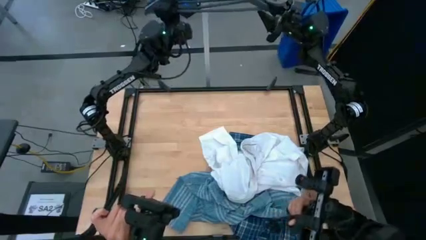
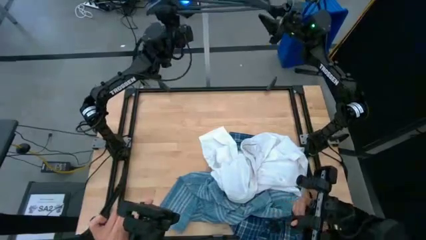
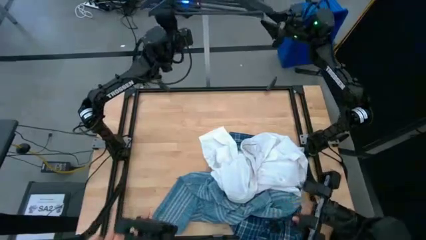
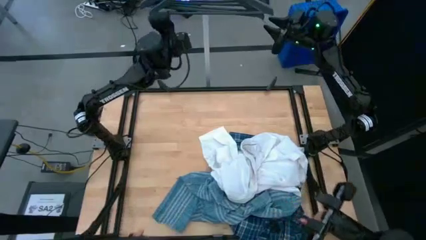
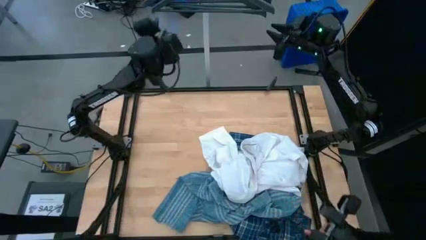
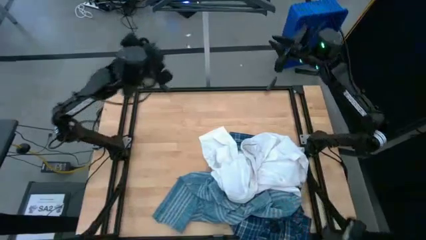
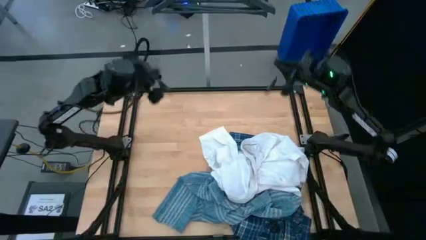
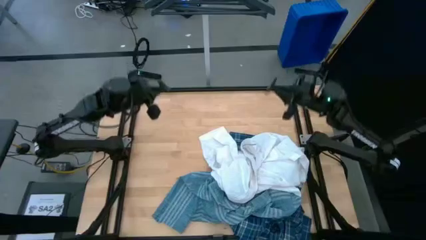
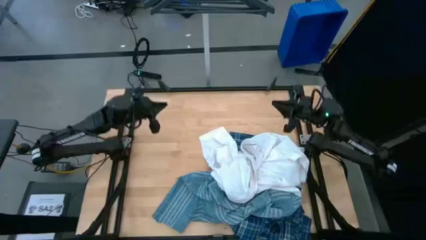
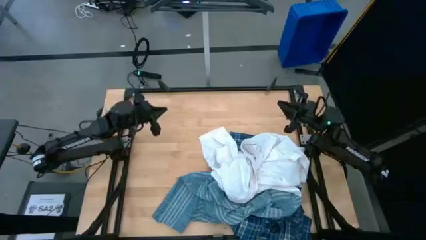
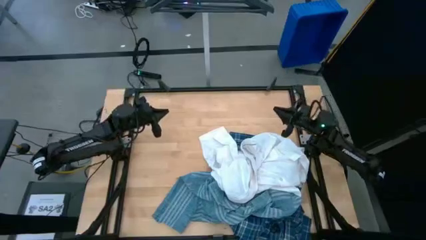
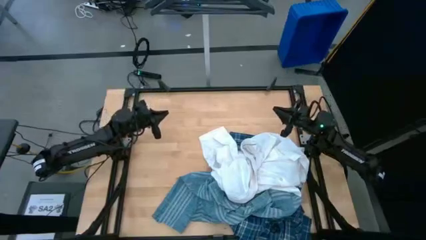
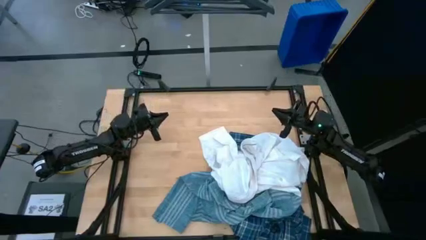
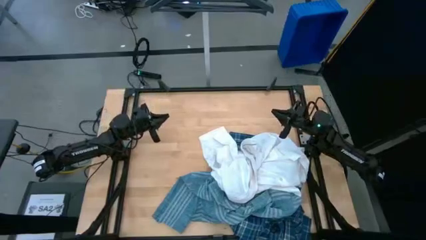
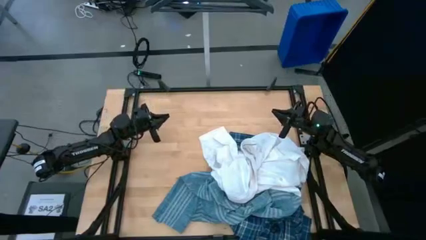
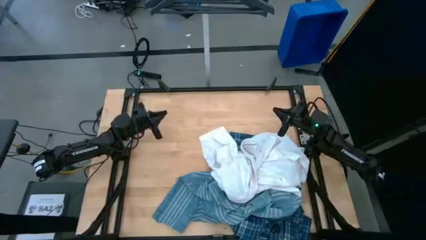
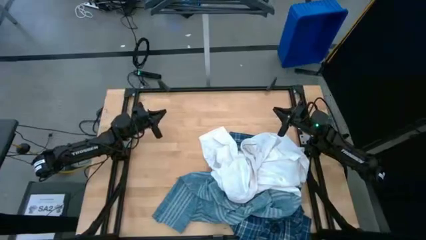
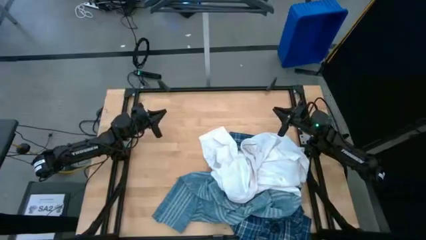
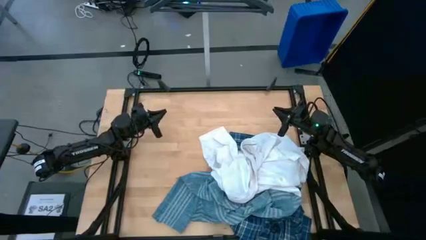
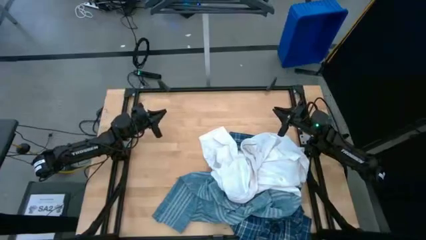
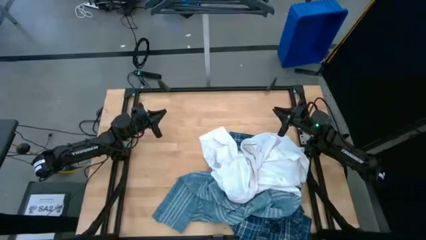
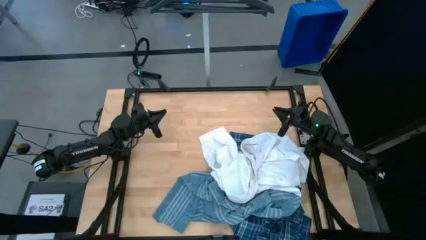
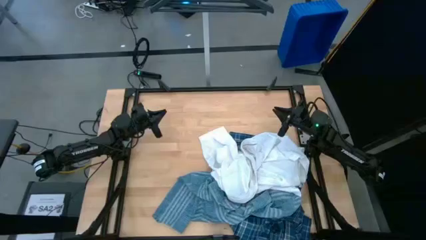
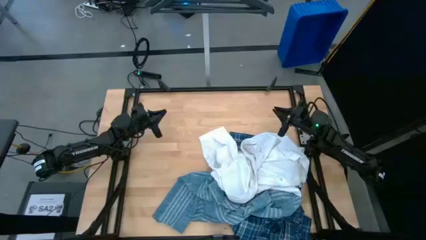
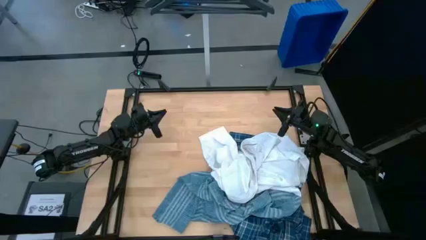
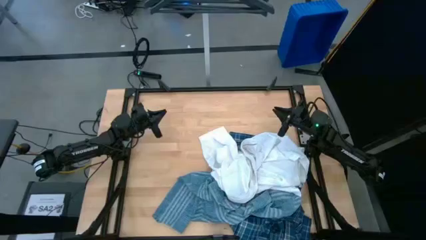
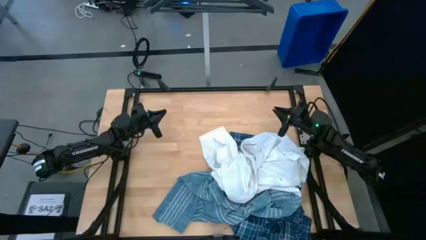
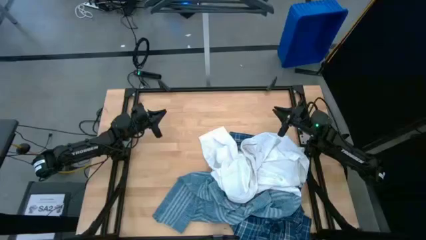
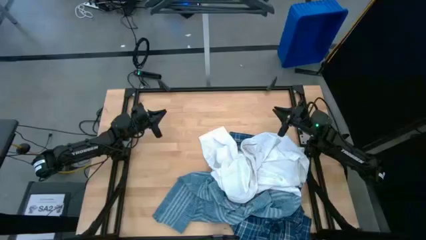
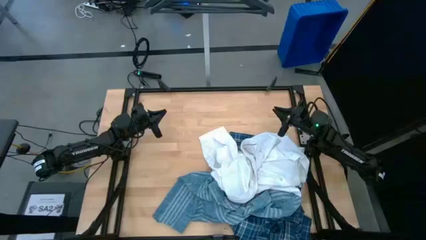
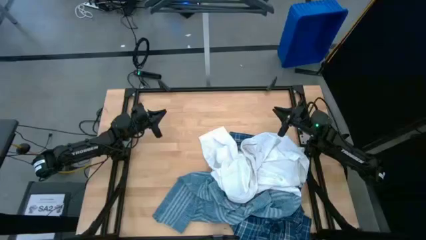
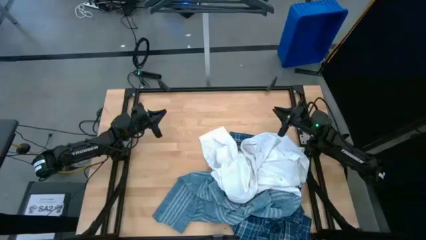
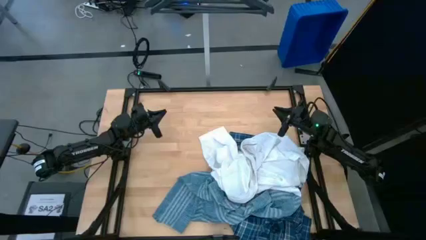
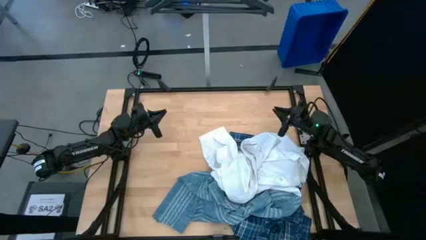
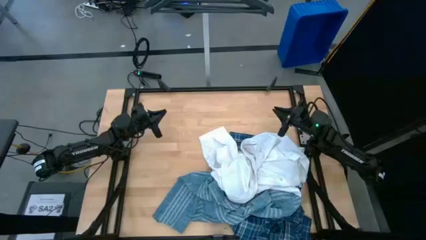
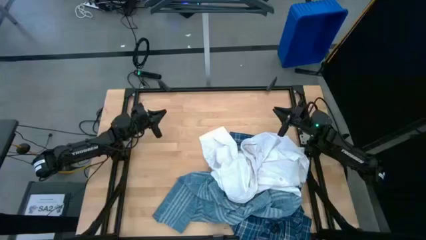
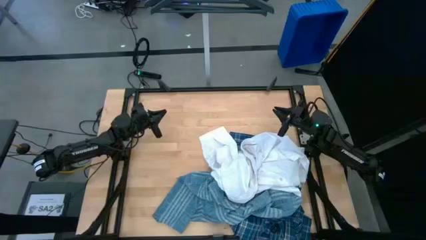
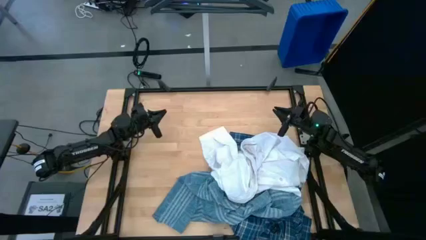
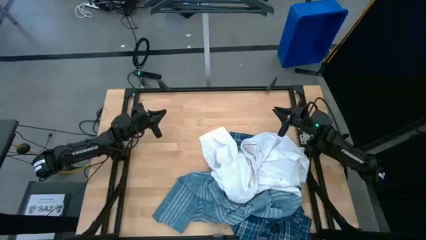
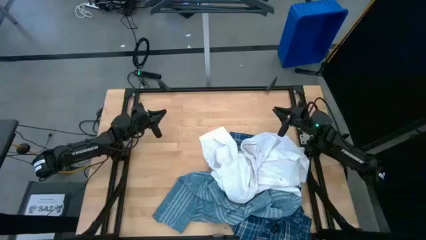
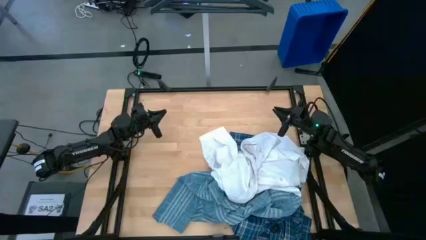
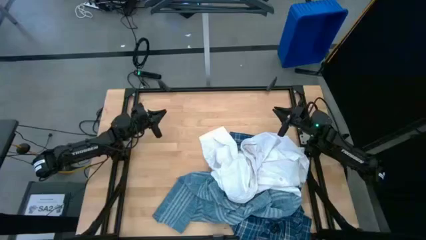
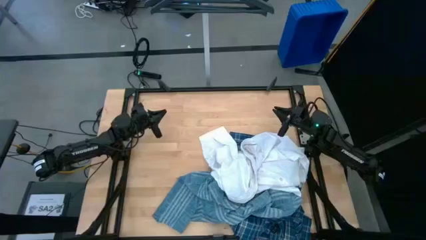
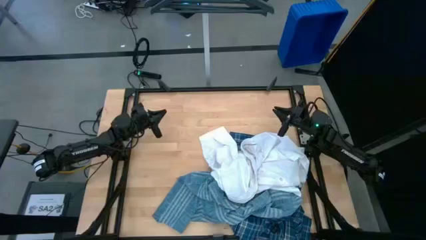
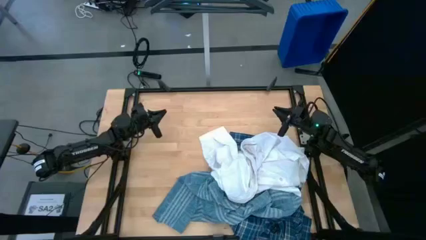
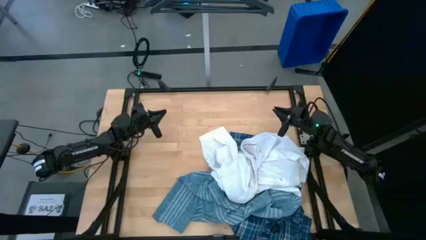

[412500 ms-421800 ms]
Task: Hang clothes
Return to Home Position

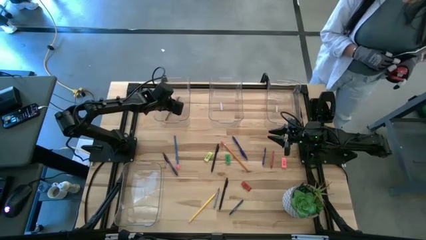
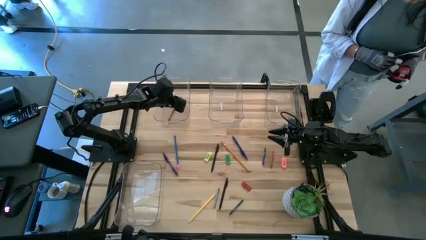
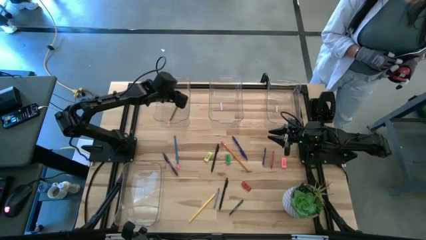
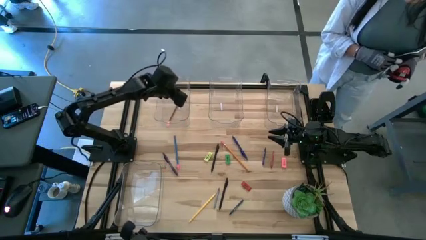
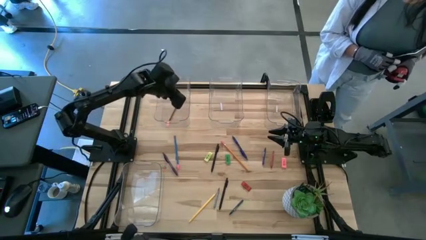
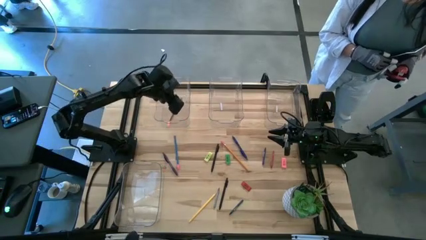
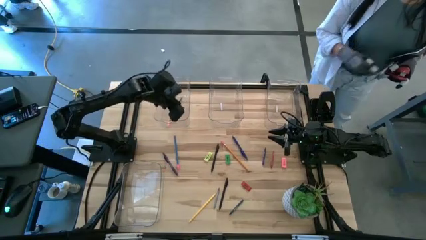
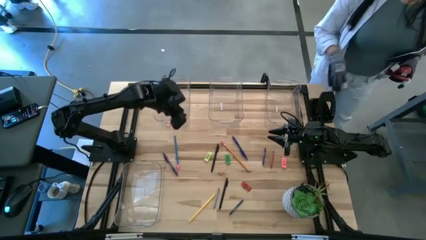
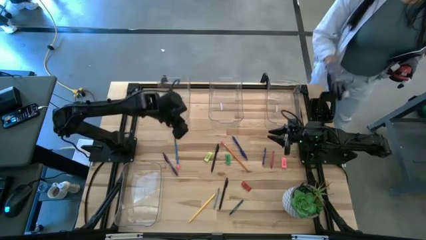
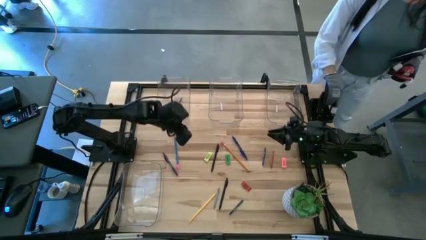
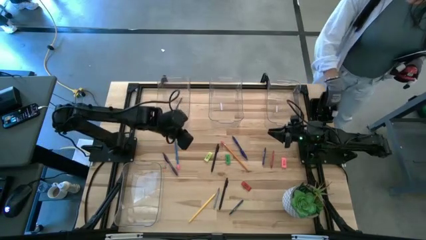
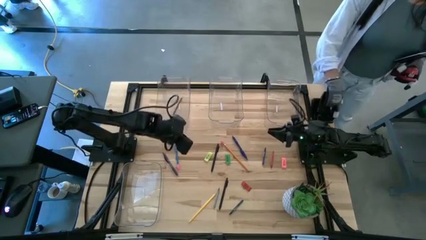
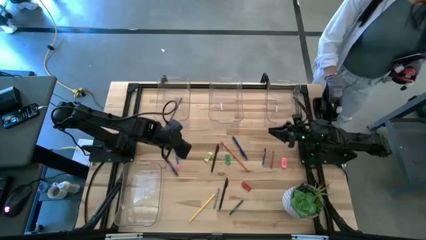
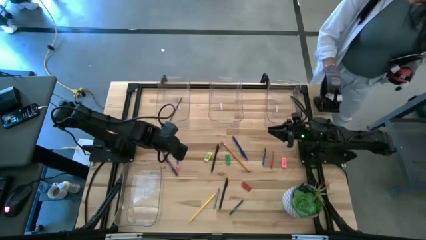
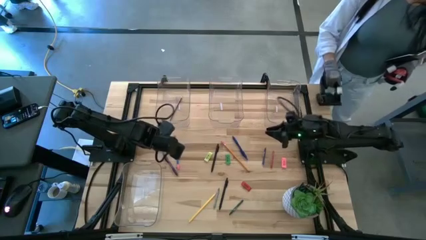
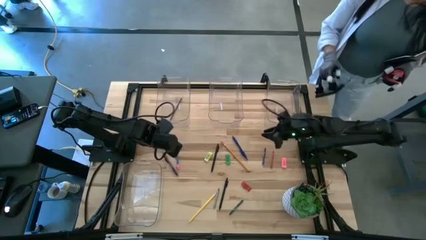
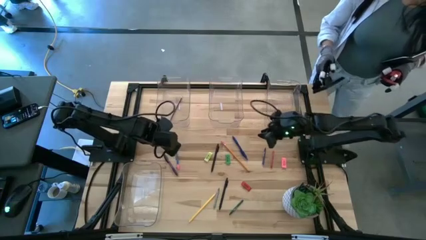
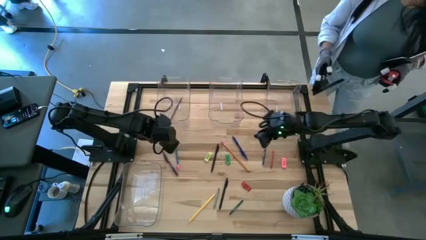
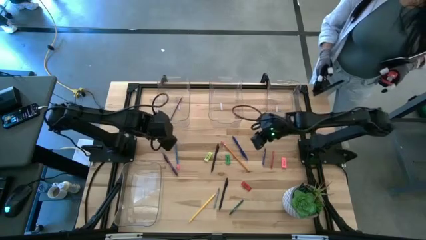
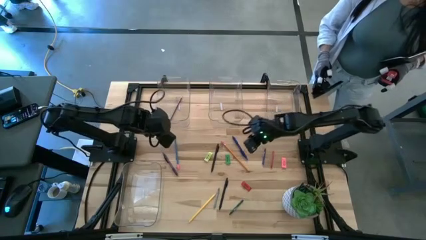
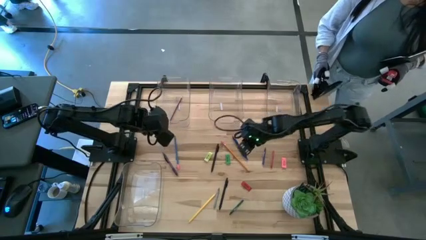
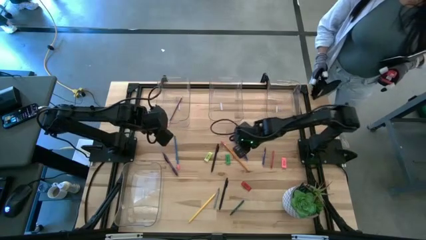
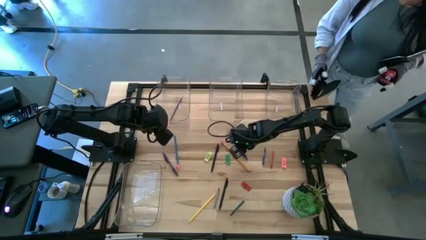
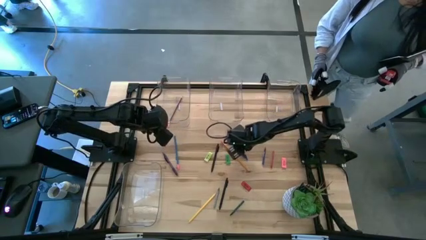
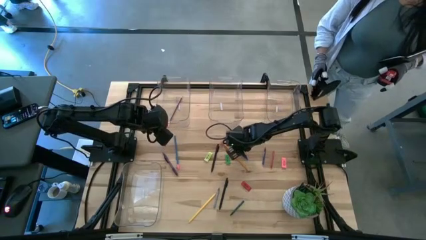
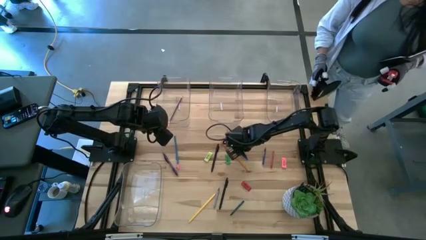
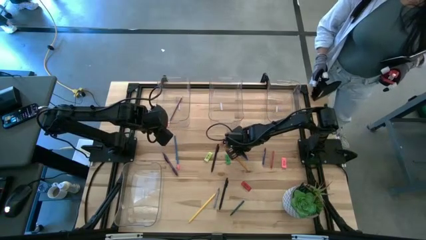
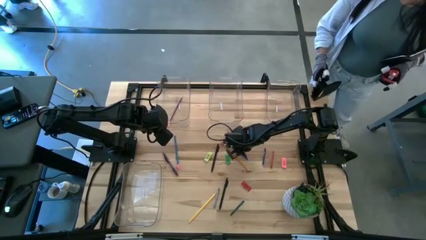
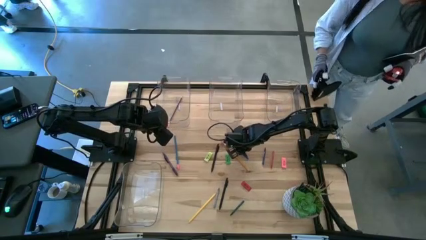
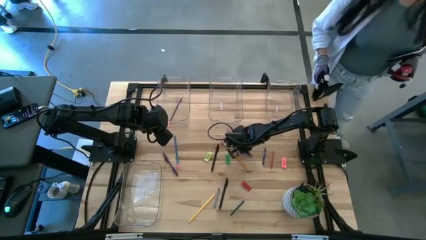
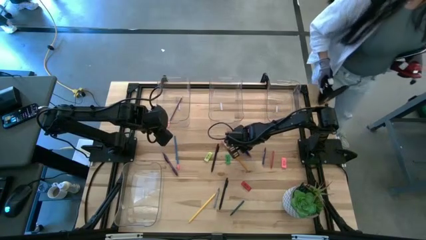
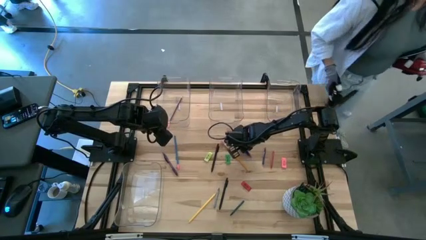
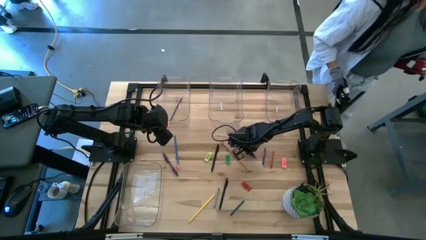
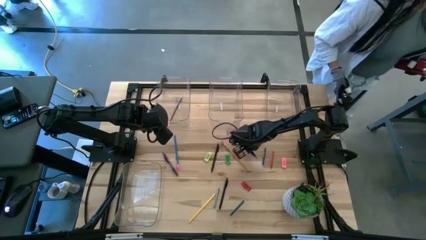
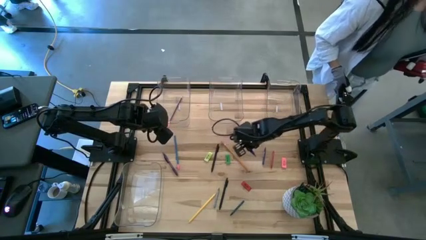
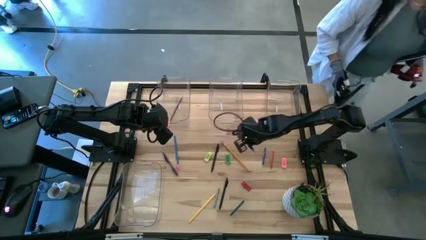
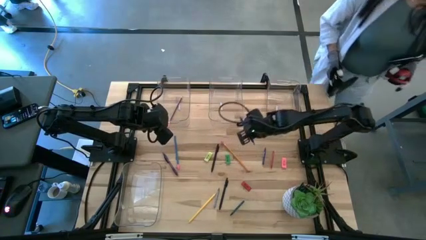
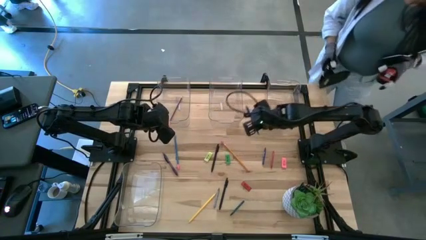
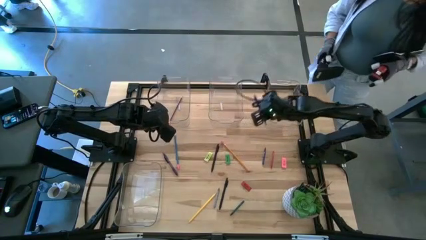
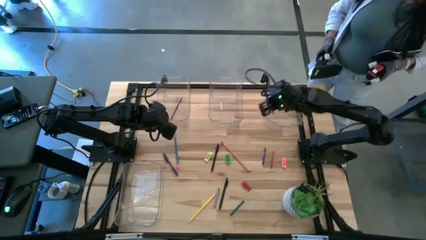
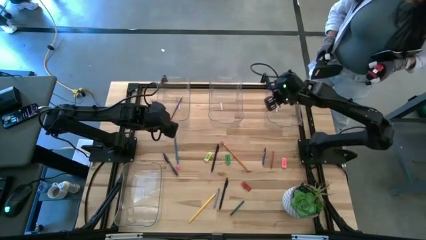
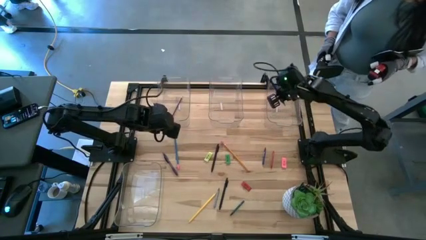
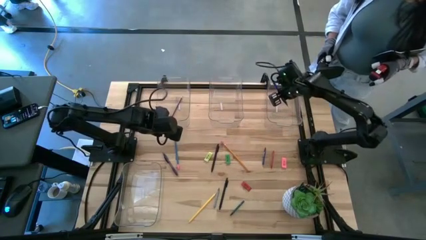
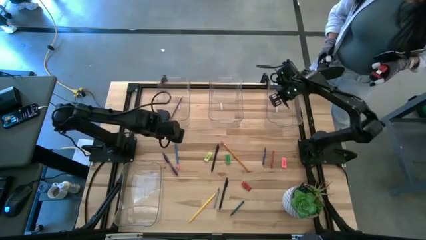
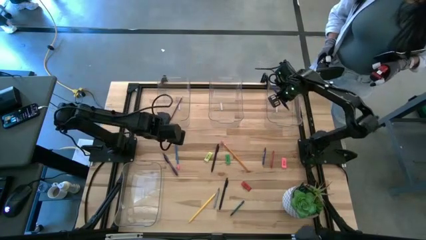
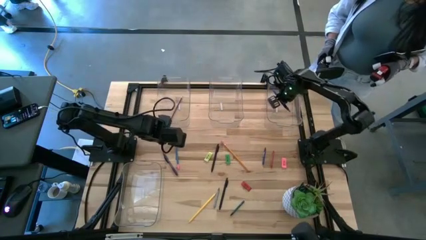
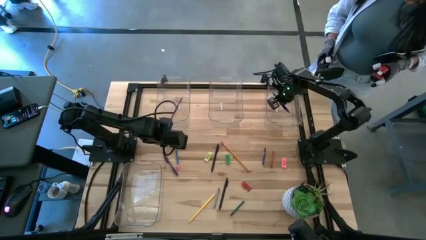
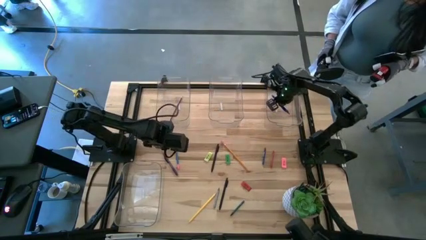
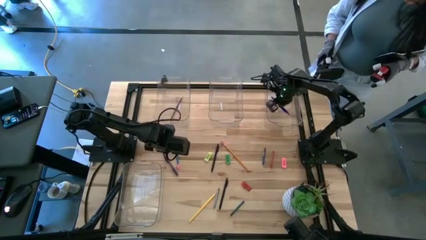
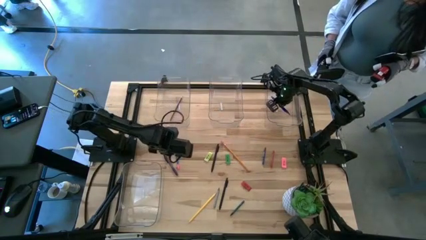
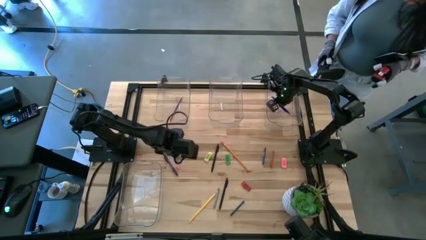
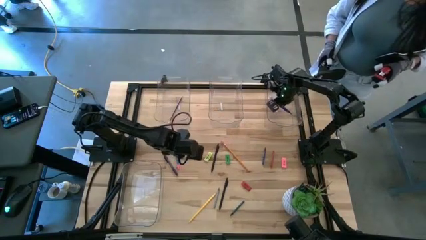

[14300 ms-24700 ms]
Task: Sort crayons/erasers/pens/pencils in bins
Put the blue pen into the top right transparent bin
